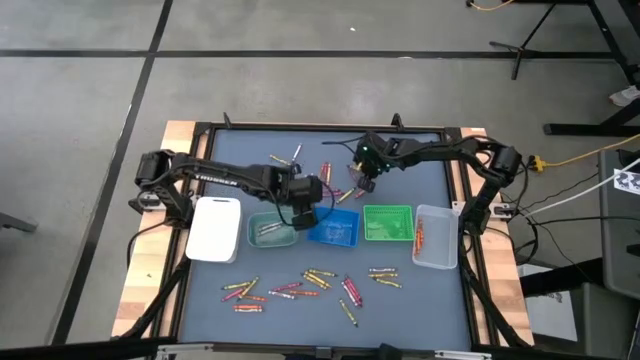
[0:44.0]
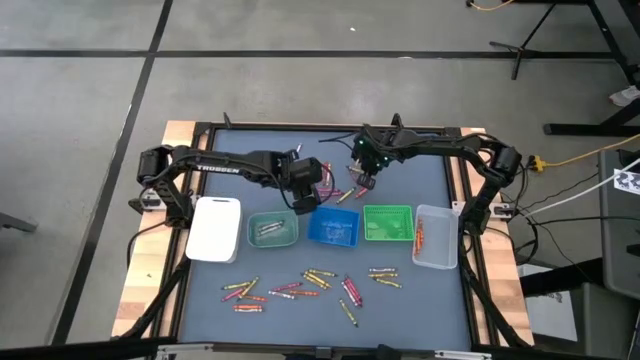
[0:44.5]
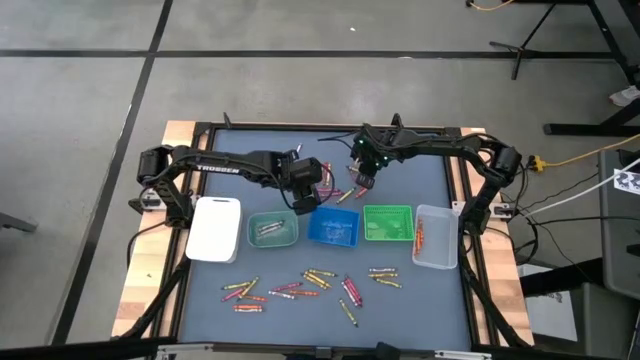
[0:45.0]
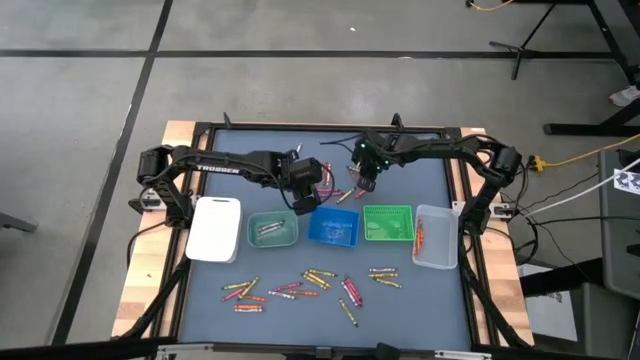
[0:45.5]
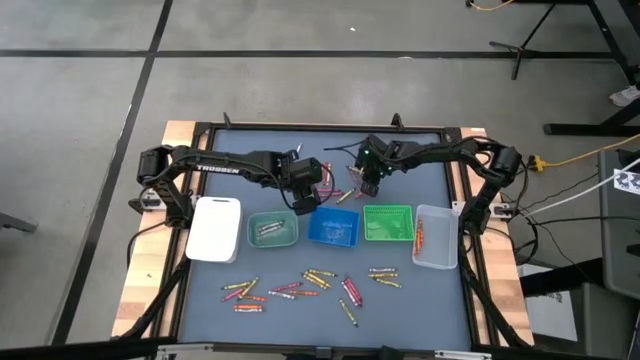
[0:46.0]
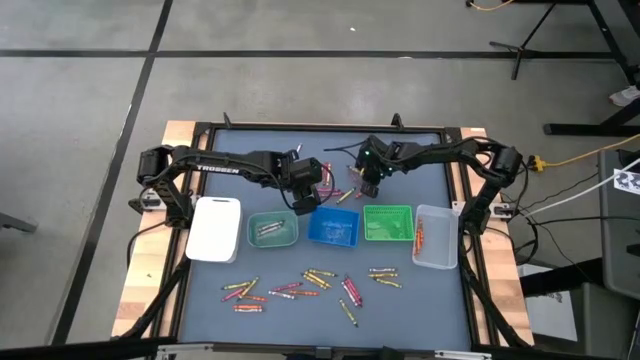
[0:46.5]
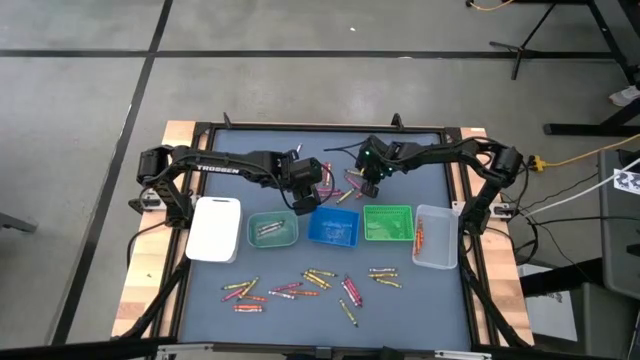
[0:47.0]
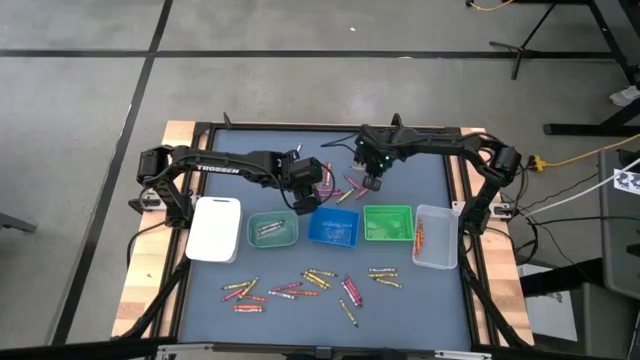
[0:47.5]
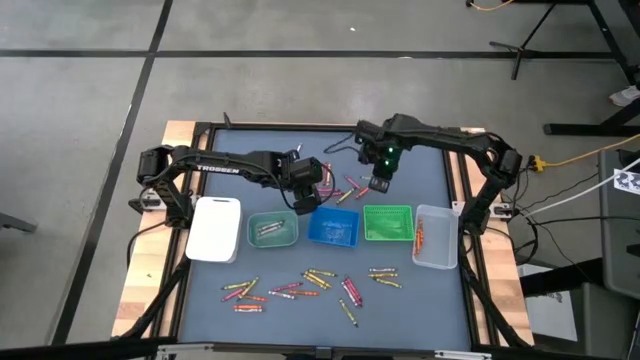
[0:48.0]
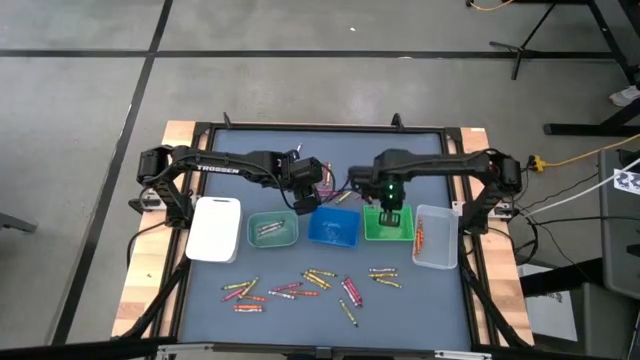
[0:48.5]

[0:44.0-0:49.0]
Task: Sort crayons
Put the green crayon into the green bin

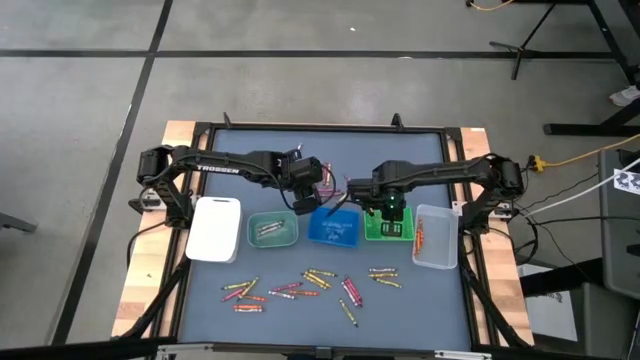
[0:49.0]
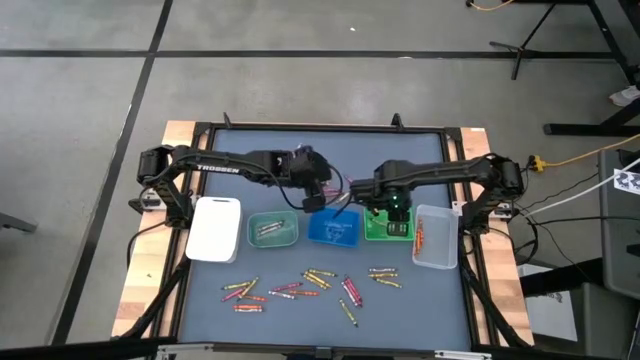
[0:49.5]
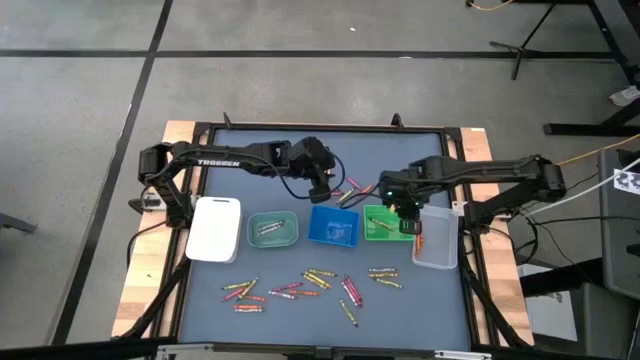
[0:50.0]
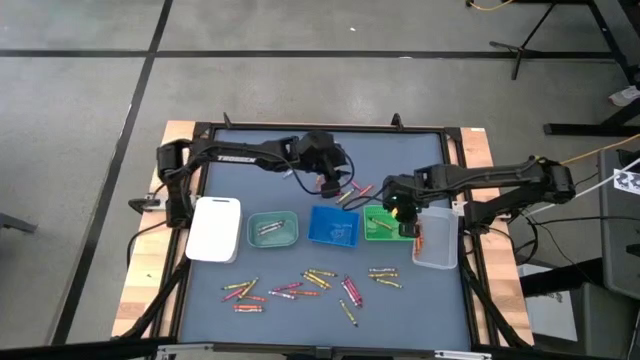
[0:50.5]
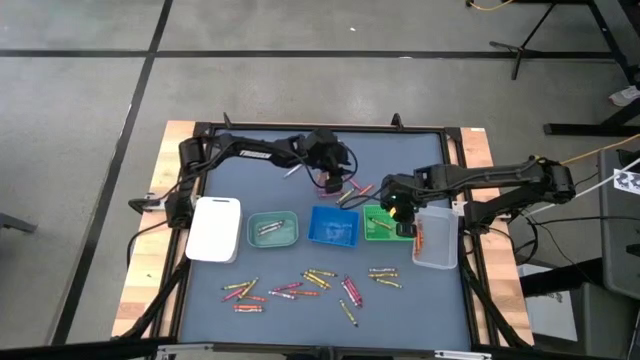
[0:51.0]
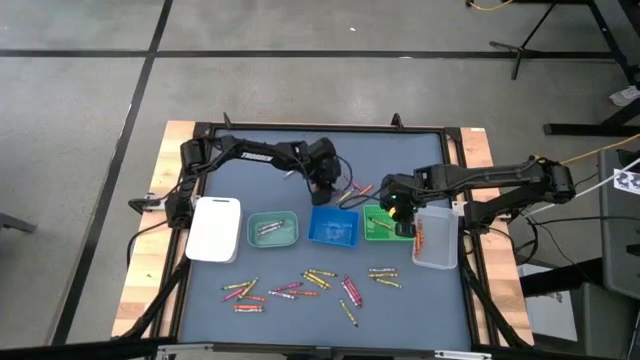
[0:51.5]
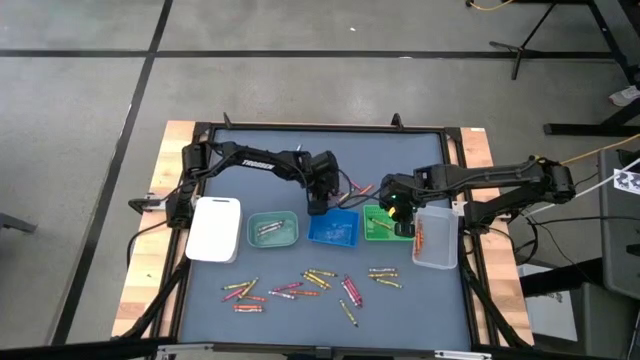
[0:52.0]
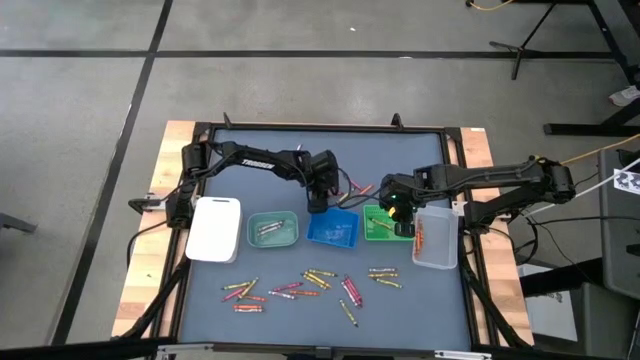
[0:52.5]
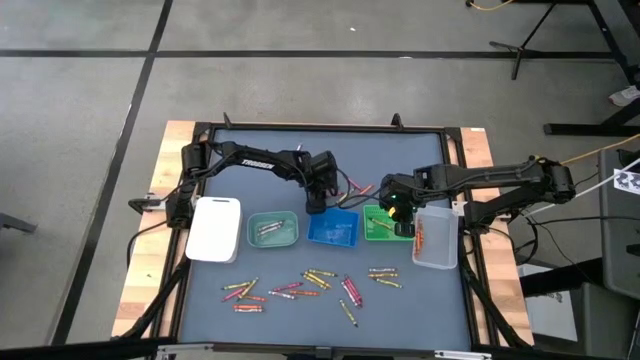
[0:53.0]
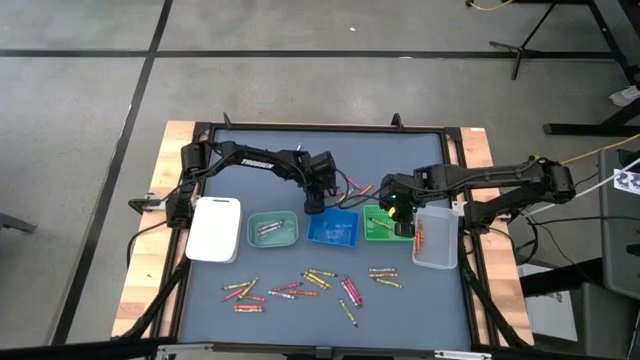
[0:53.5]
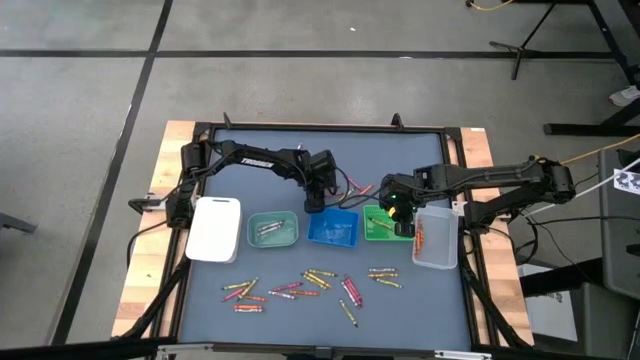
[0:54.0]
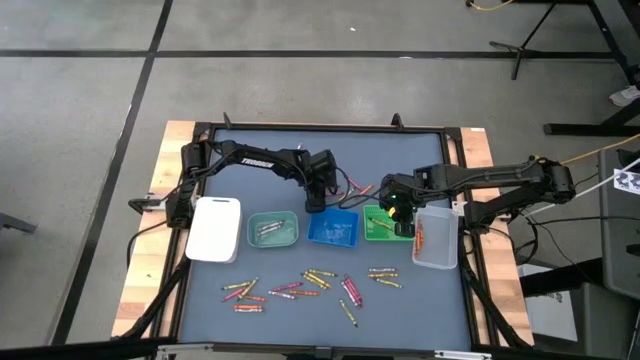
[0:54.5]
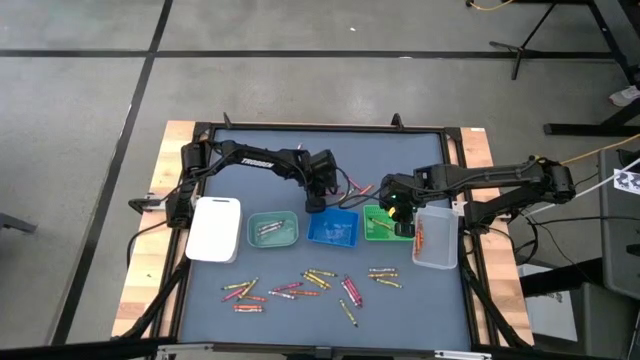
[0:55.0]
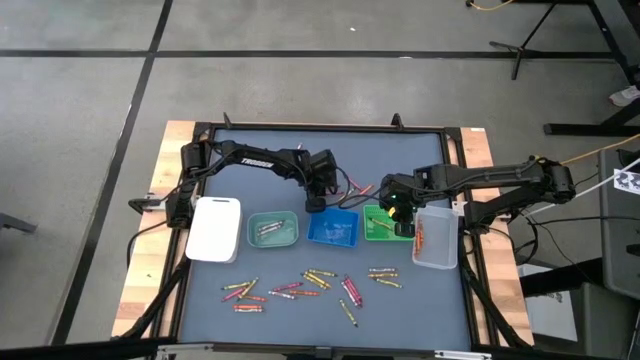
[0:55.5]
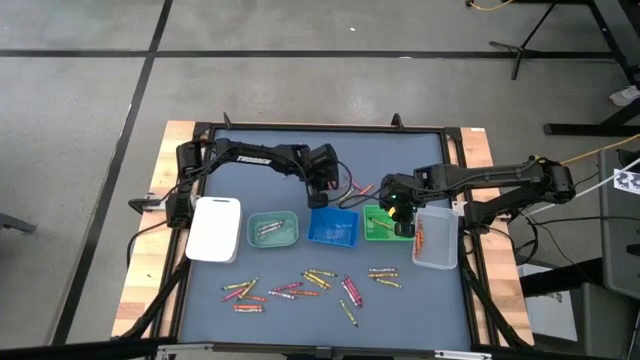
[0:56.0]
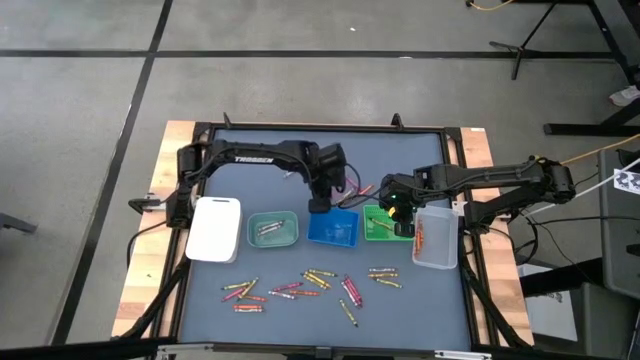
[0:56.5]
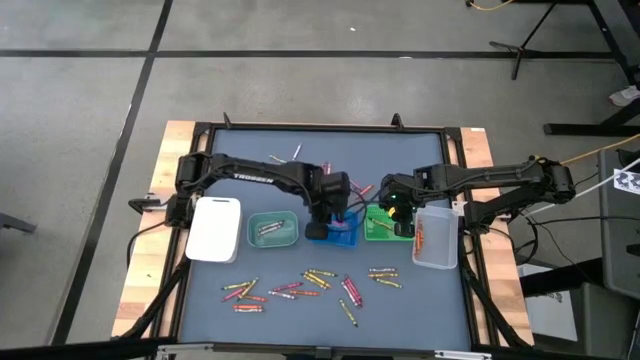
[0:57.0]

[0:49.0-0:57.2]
Put the red crayon into the blue bin

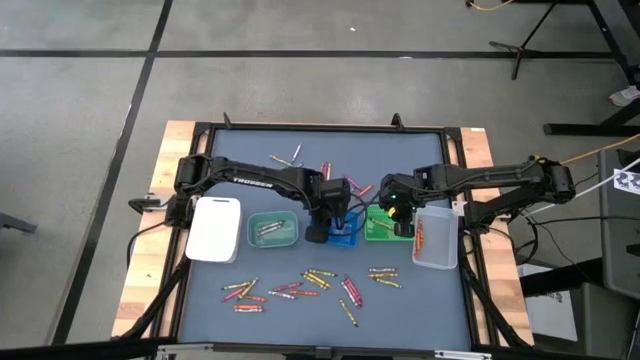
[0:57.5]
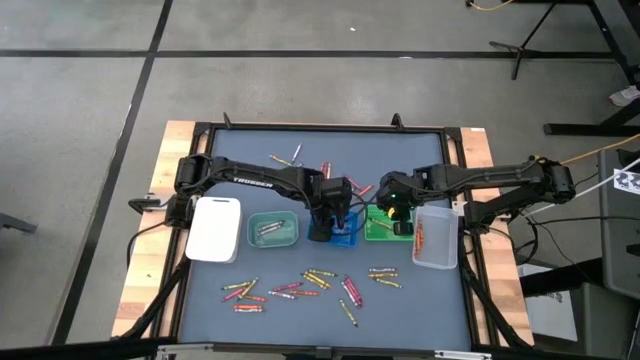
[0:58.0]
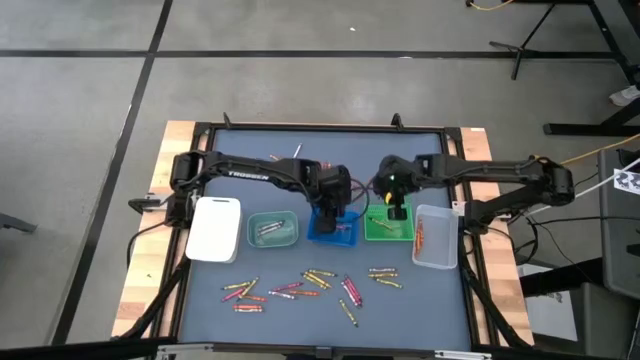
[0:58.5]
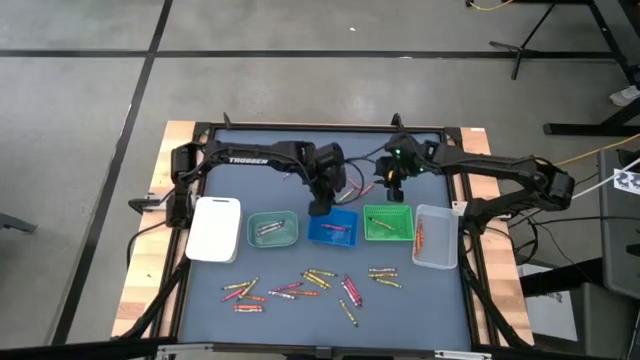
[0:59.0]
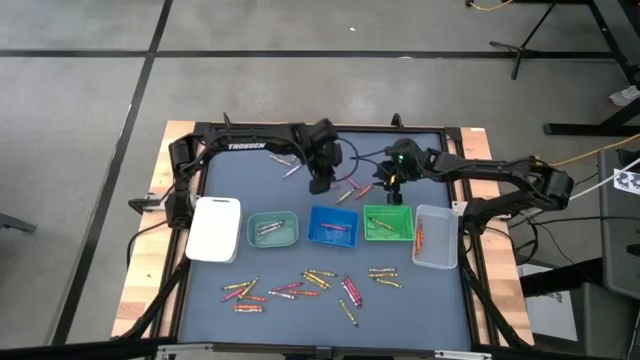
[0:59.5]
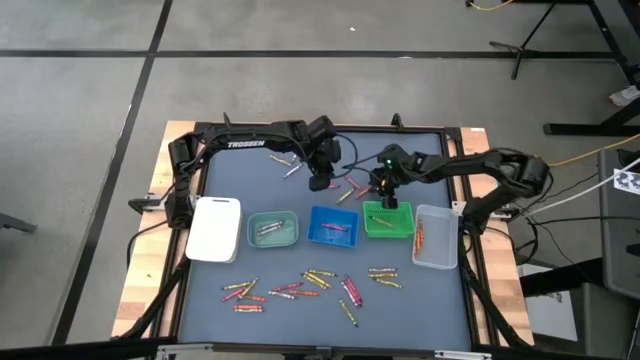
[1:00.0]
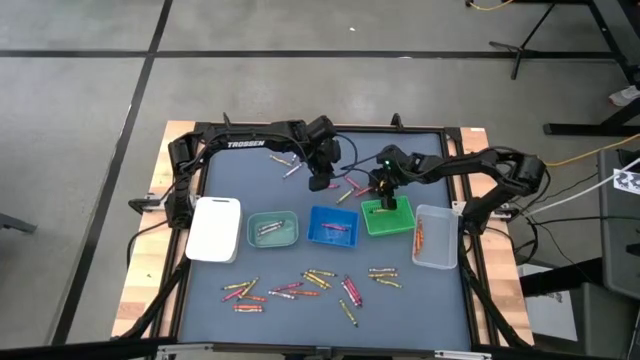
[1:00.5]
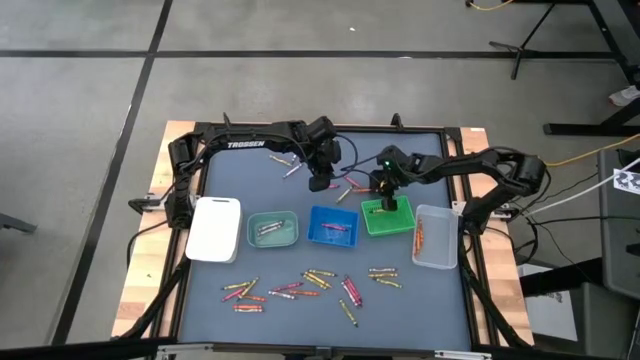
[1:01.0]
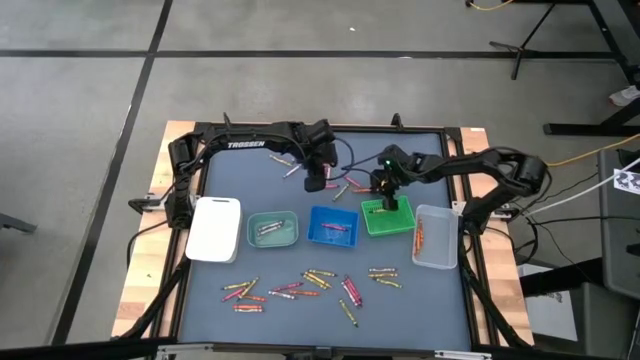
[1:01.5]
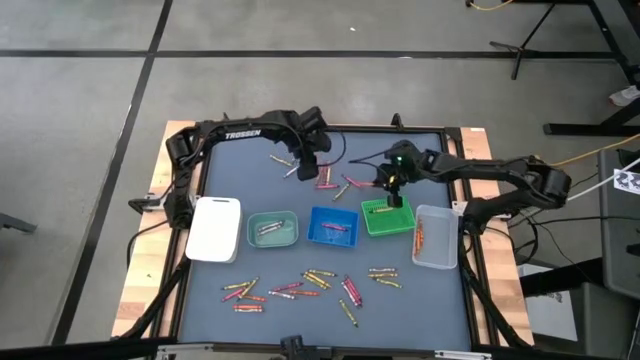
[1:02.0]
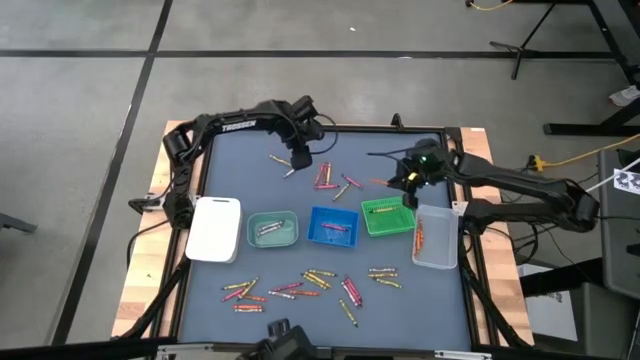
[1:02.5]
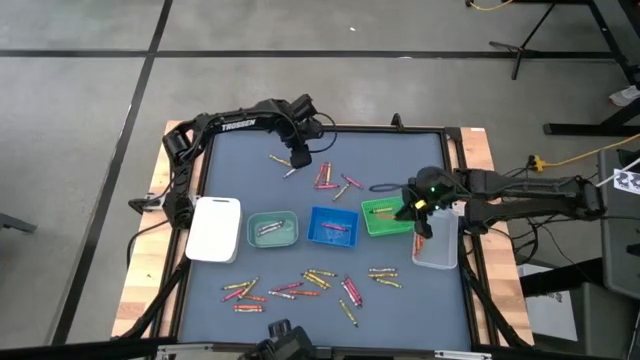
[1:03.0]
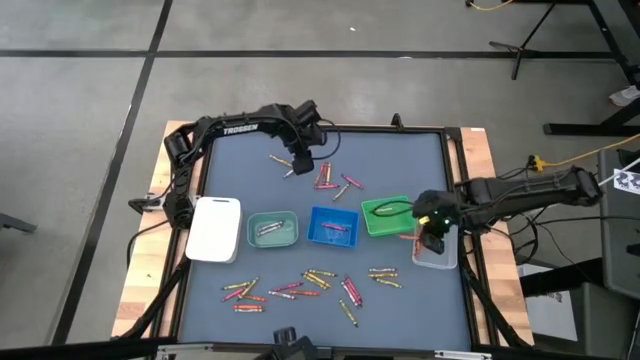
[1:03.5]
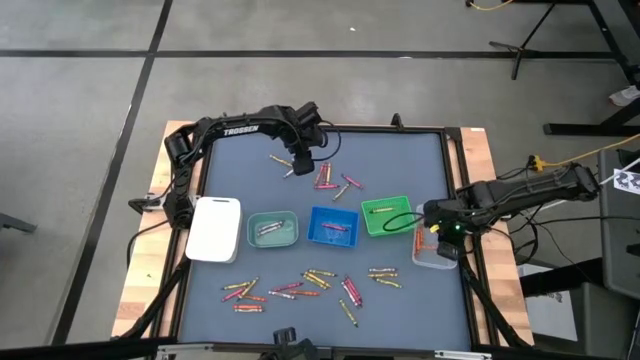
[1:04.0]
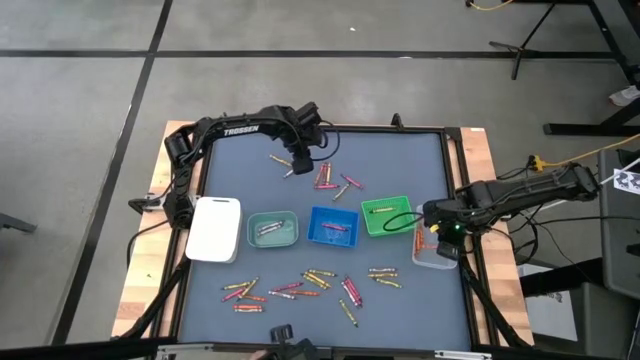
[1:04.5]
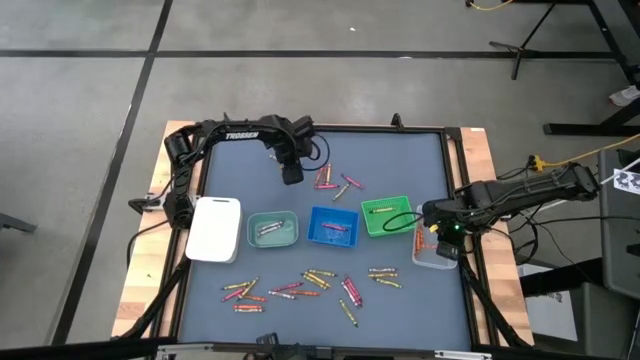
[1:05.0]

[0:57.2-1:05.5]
Put the orange crayon into the transparent bin
